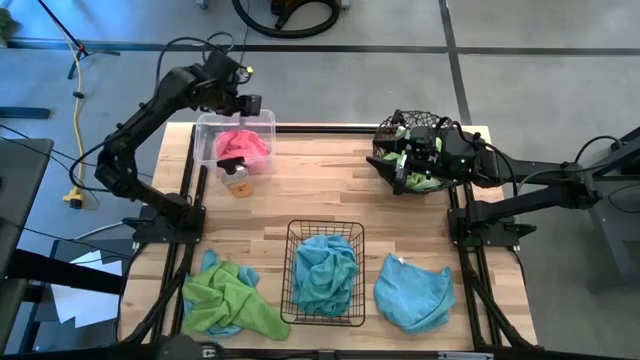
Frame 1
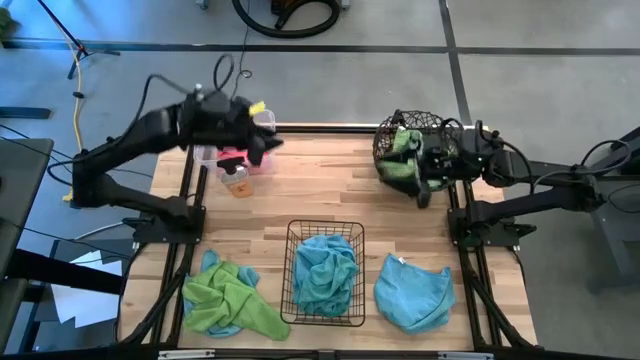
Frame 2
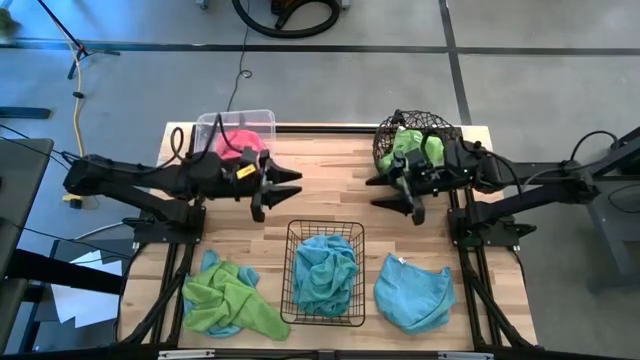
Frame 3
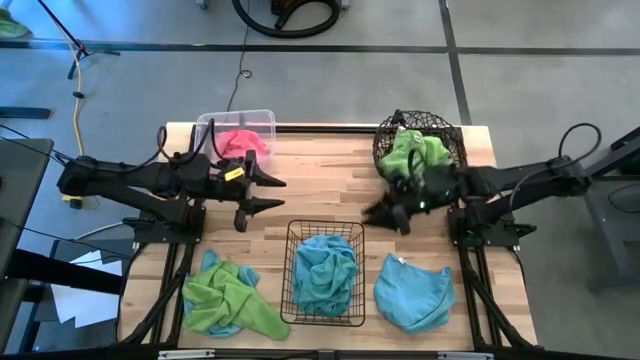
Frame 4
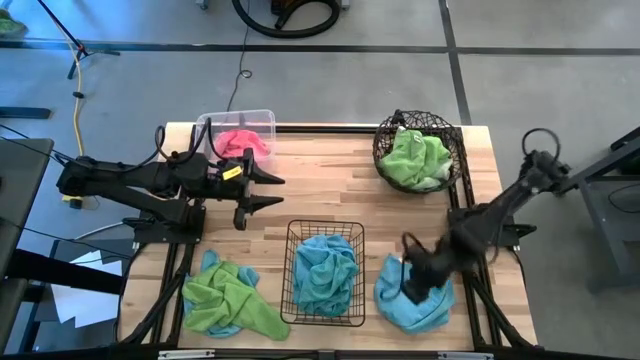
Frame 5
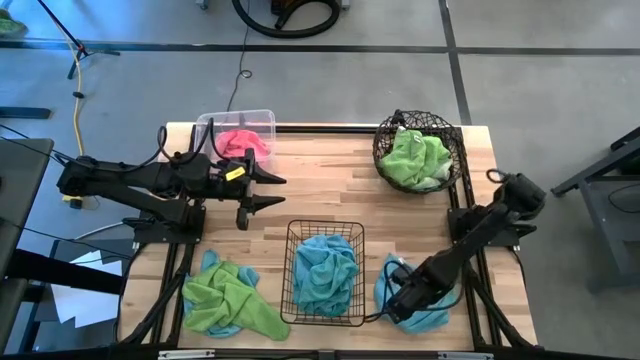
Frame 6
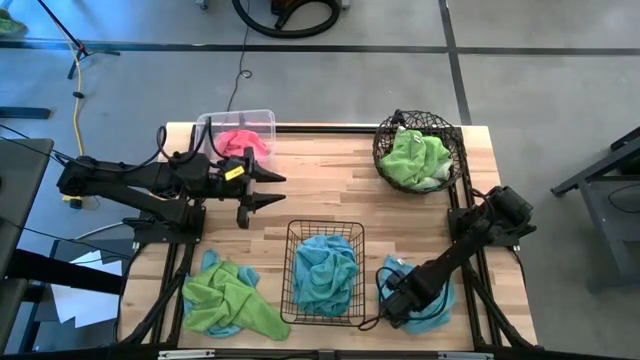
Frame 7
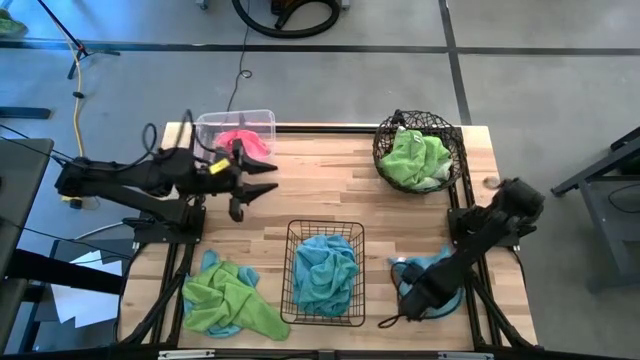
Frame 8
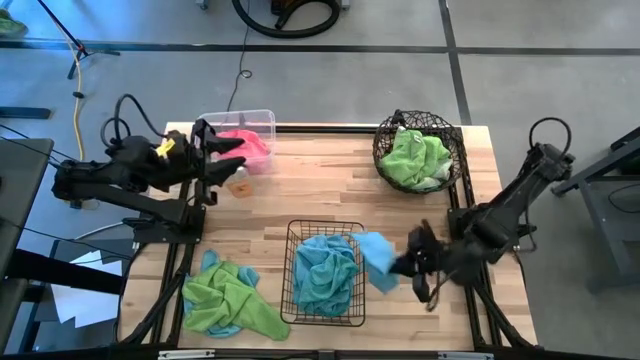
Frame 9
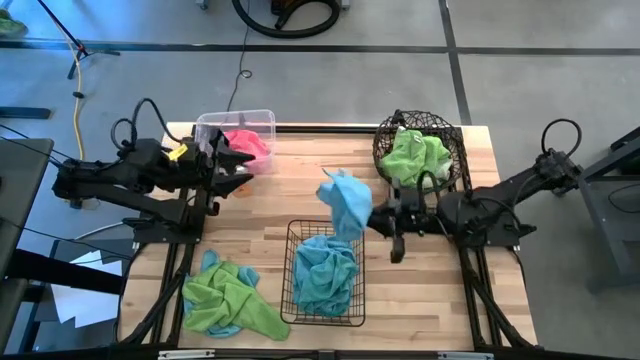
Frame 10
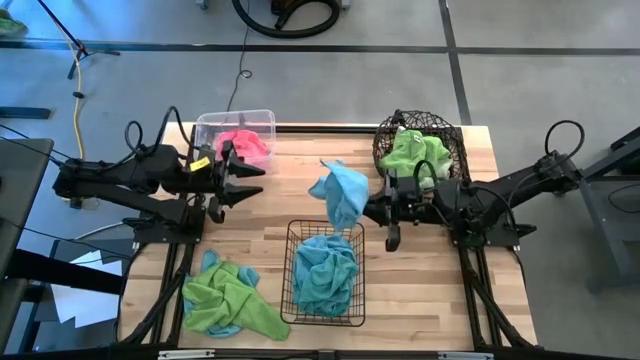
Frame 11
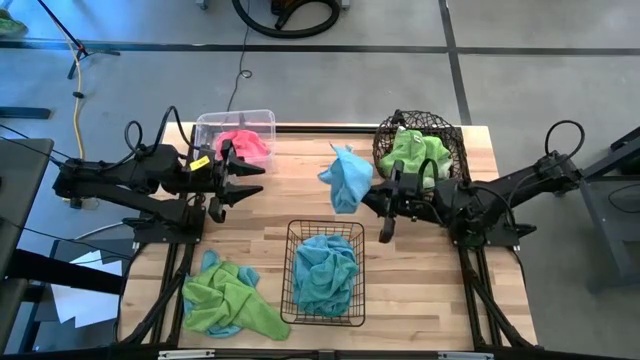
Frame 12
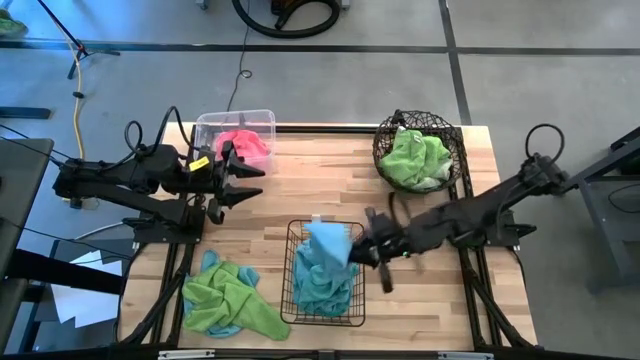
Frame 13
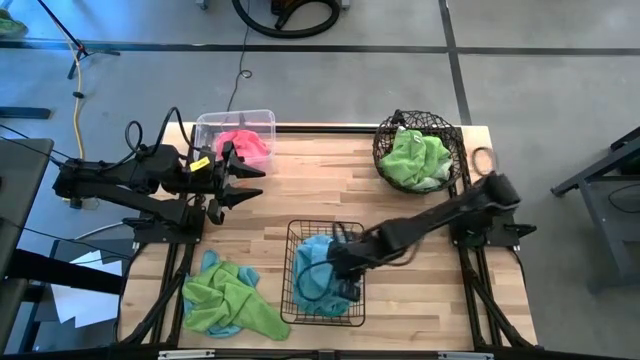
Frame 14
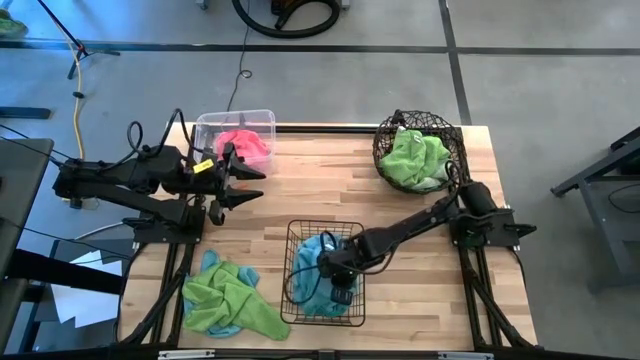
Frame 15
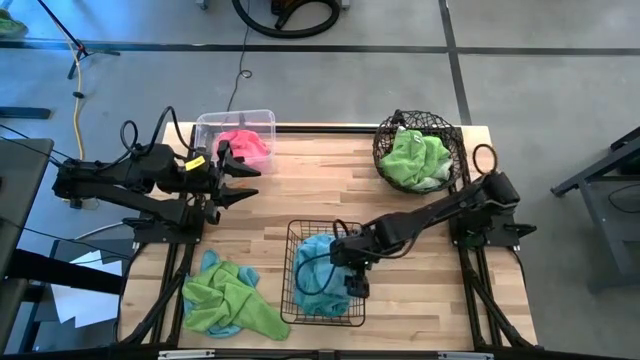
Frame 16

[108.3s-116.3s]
Task: Sort microfiber towel by color & place in baskets
Put the right blue towel into the bottom basket

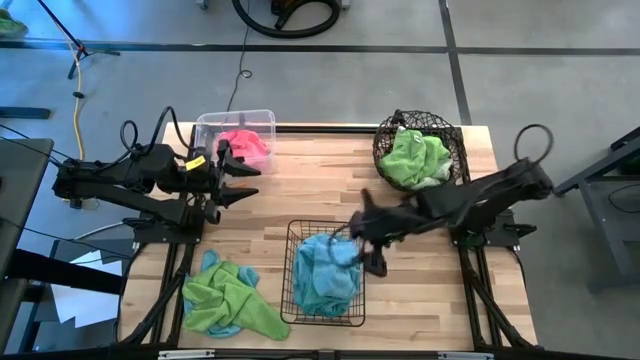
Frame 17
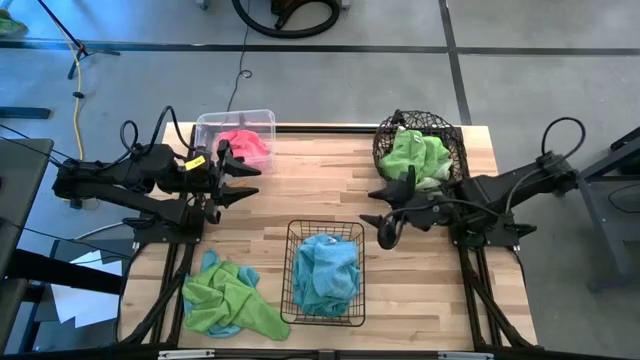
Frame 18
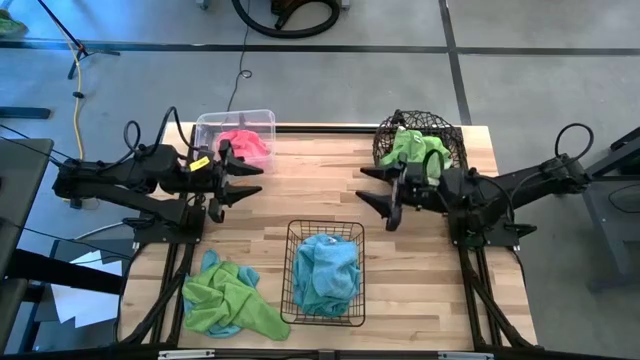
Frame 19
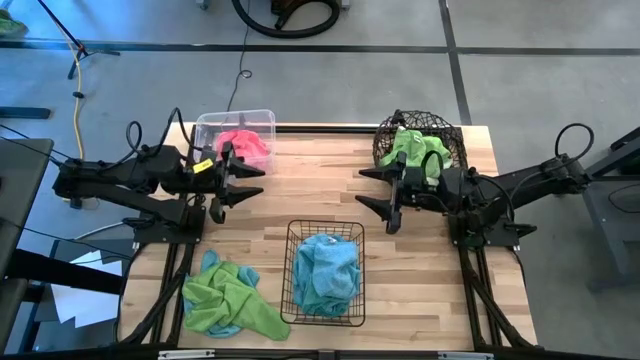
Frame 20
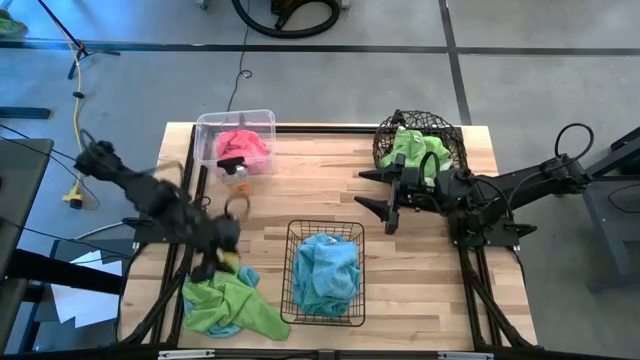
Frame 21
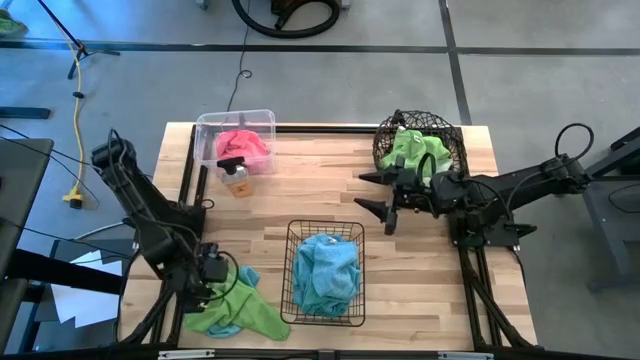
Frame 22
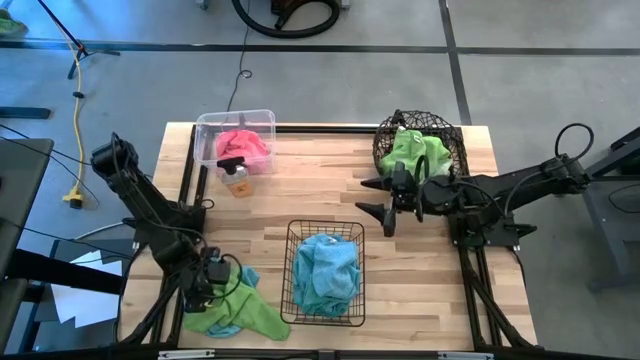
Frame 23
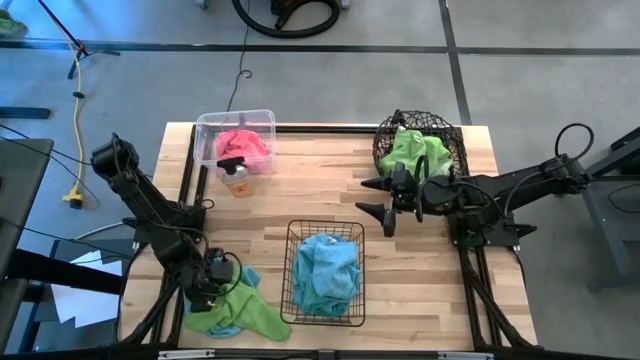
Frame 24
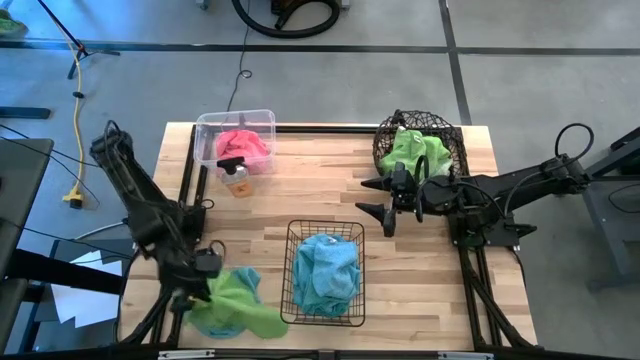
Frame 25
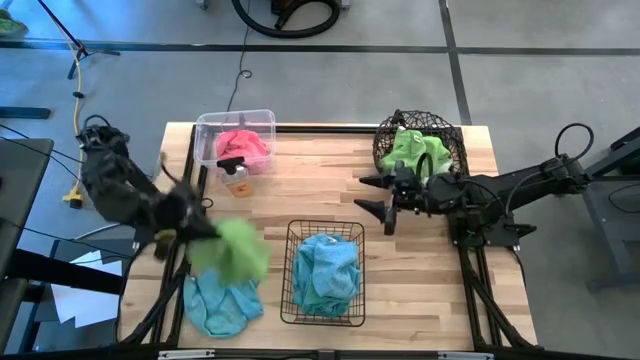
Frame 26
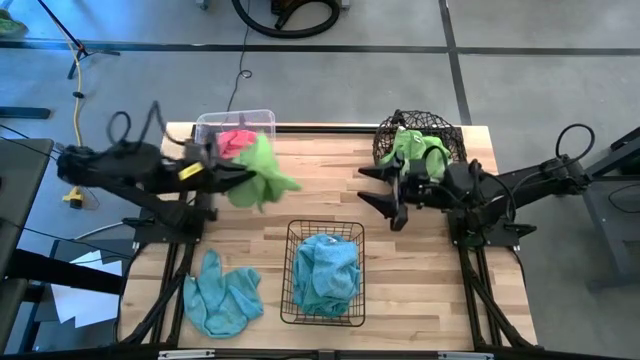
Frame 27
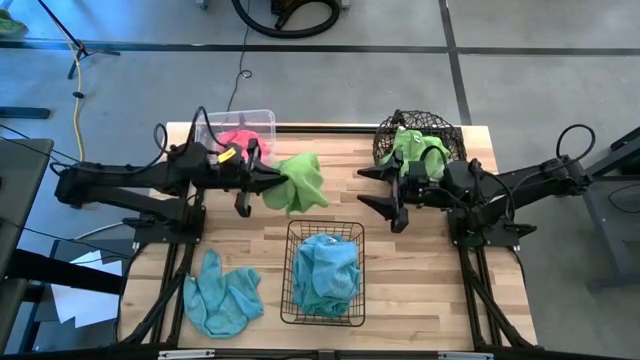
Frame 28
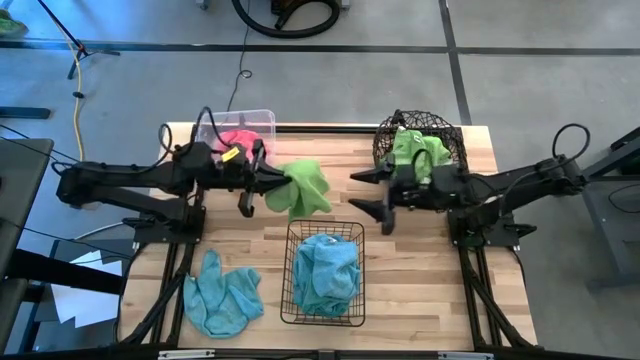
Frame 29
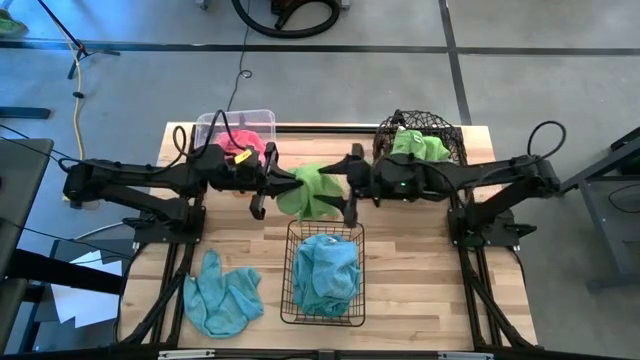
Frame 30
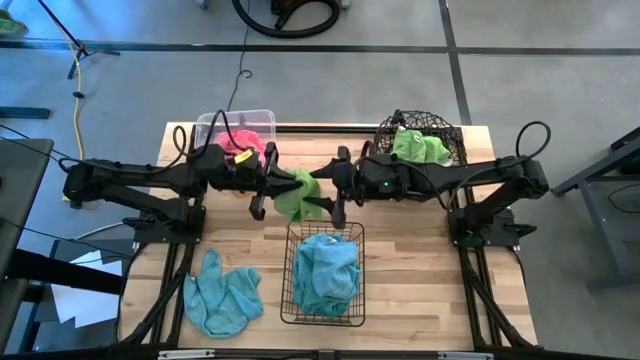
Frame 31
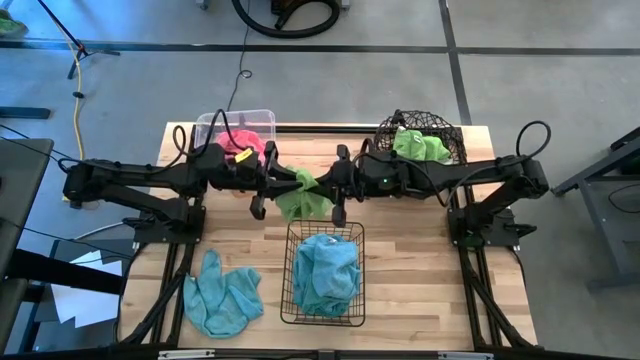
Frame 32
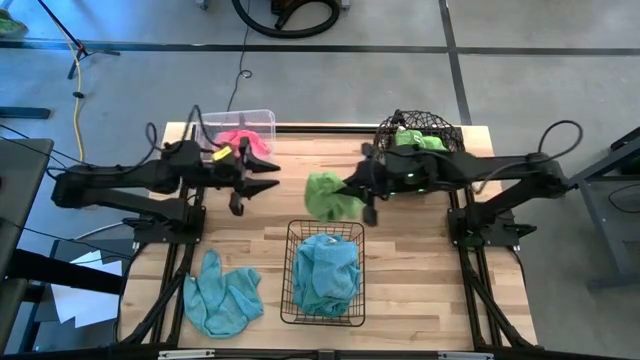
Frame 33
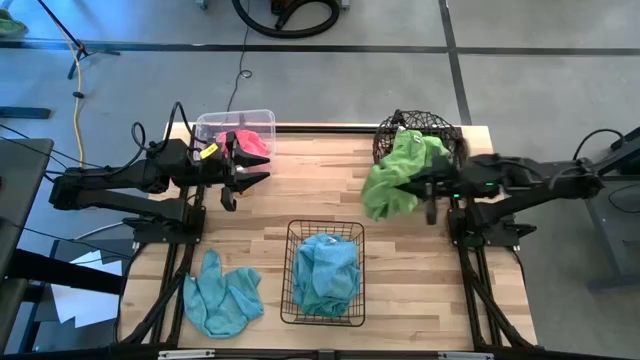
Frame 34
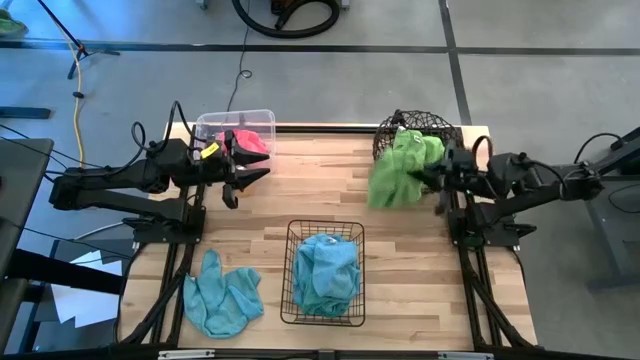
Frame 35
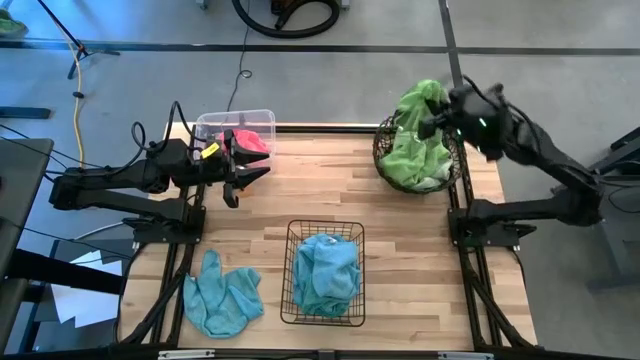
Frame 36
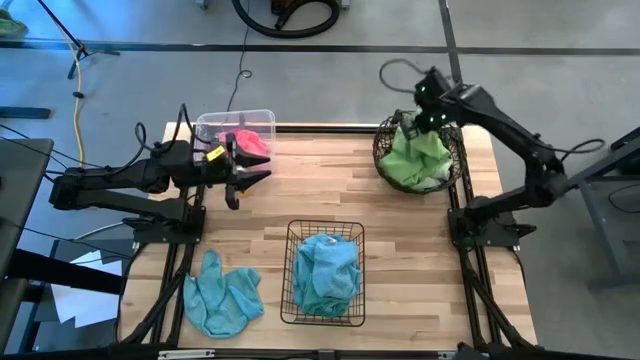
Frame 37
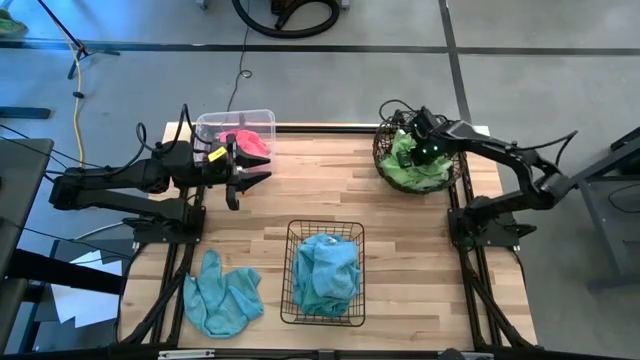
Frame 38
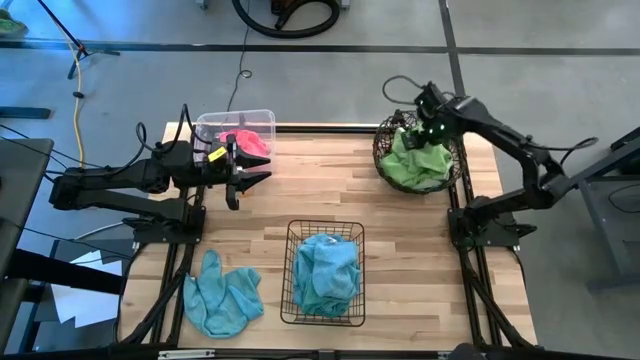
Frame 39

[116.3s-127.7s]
Put the green towel into the top right basket

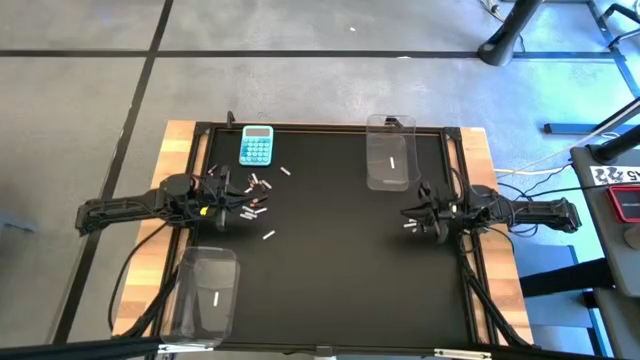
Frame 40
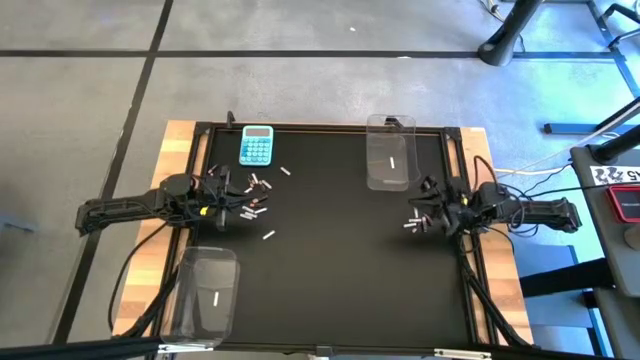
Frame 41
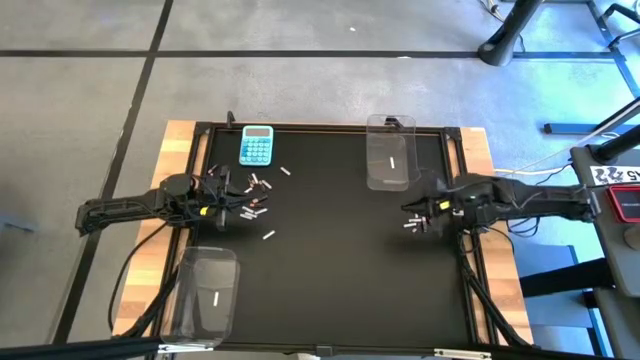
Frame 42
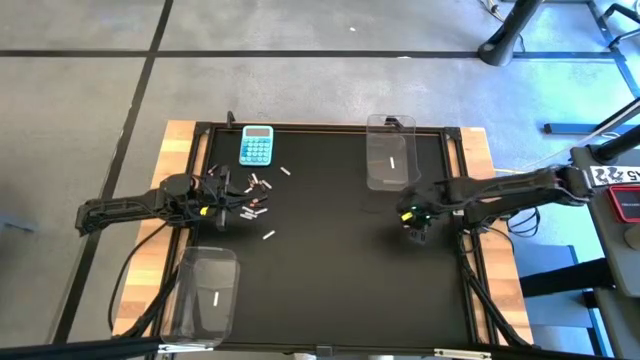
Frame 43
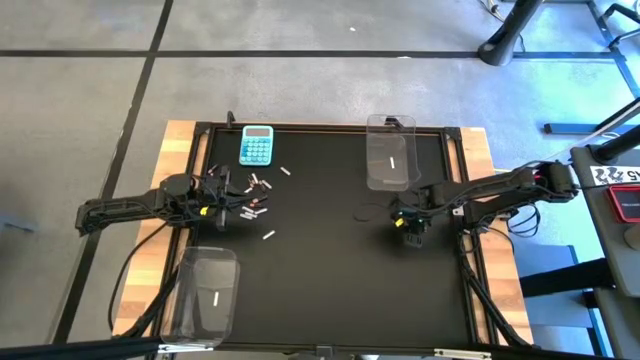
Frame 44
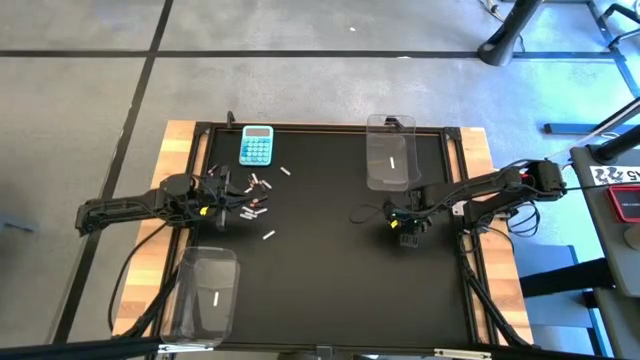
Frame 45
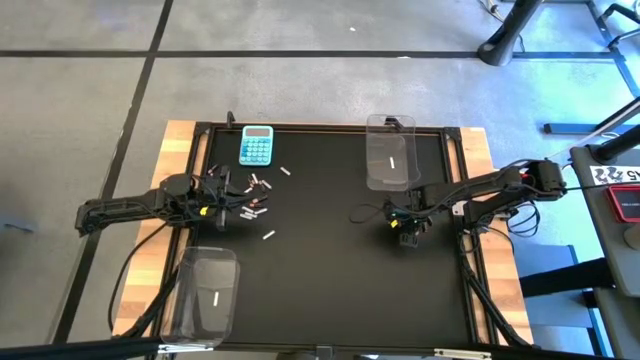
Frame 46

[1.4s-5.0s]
Task: Sort batteries
Put the white battery into the top transparent bin
